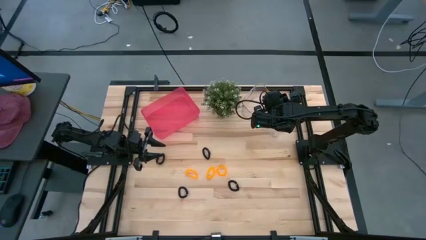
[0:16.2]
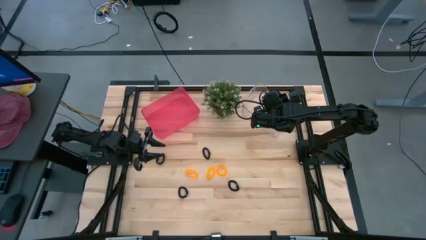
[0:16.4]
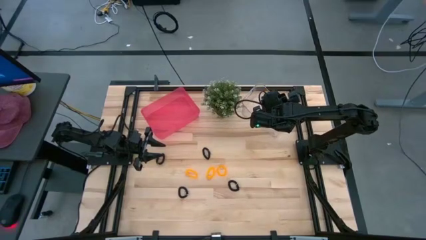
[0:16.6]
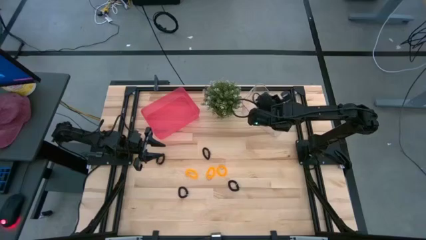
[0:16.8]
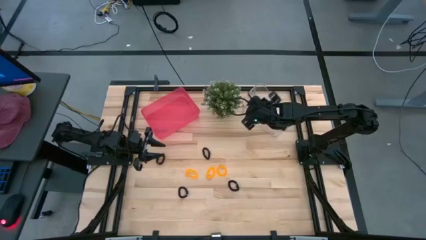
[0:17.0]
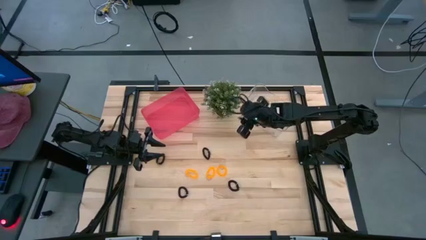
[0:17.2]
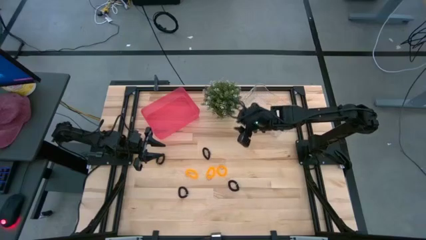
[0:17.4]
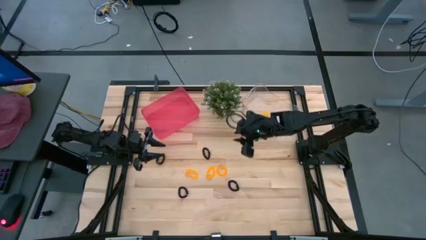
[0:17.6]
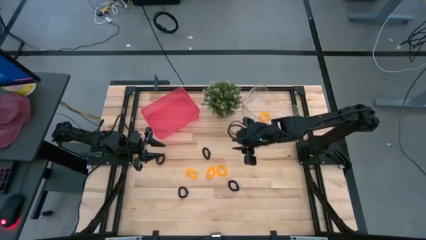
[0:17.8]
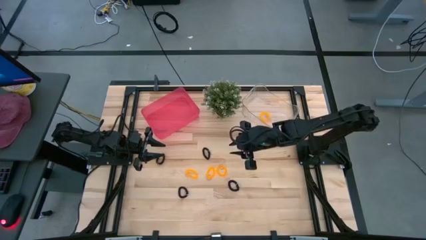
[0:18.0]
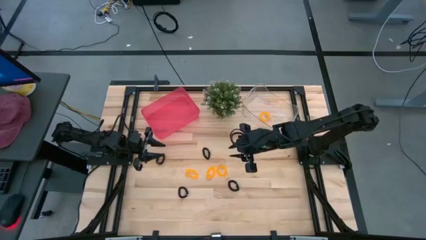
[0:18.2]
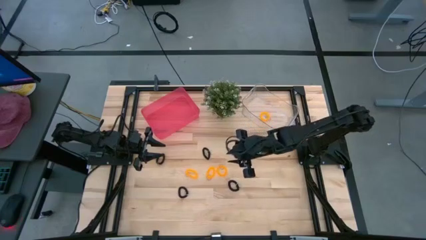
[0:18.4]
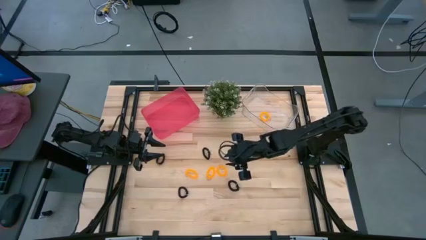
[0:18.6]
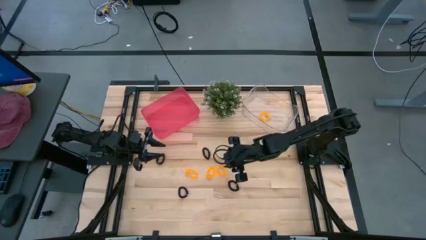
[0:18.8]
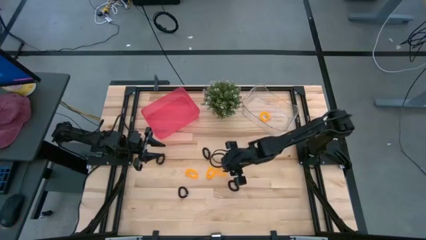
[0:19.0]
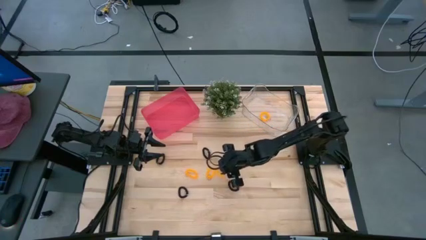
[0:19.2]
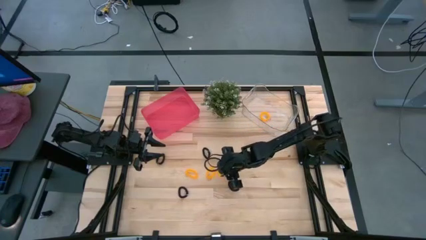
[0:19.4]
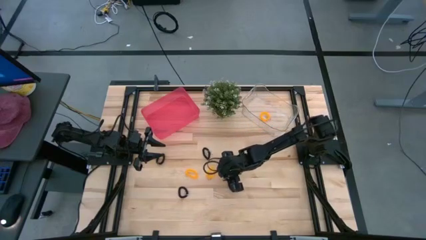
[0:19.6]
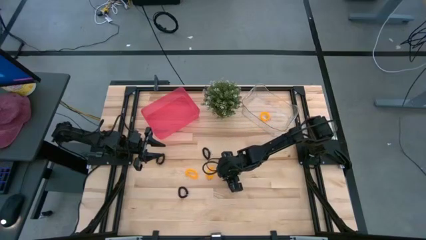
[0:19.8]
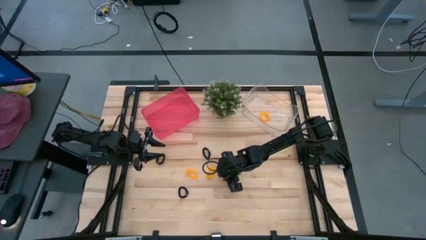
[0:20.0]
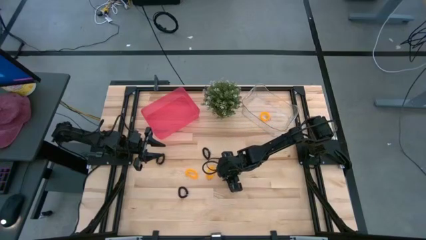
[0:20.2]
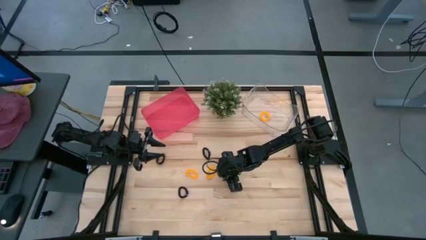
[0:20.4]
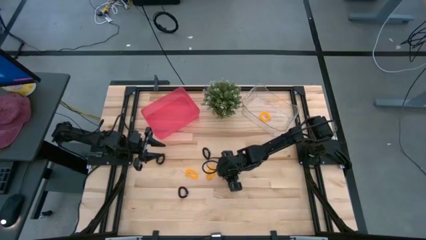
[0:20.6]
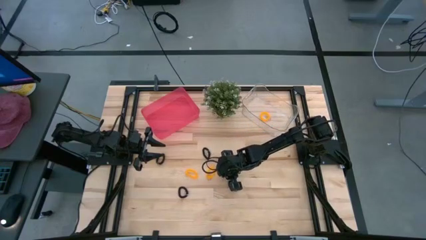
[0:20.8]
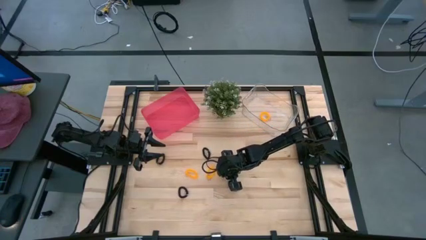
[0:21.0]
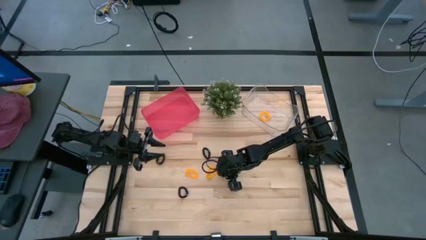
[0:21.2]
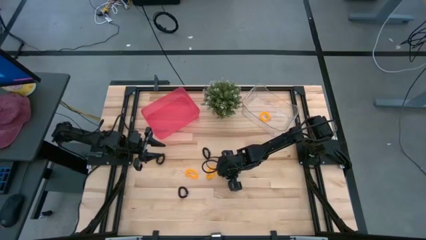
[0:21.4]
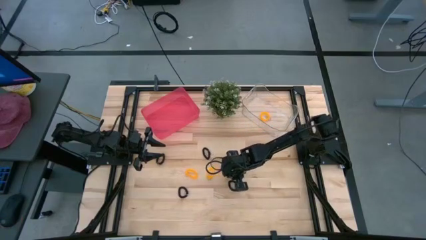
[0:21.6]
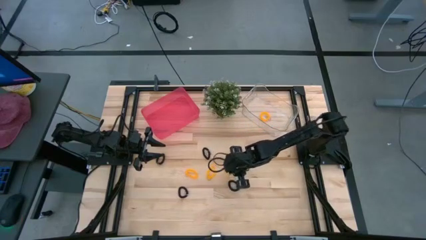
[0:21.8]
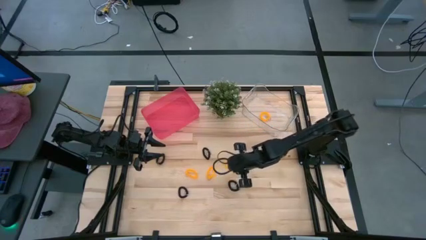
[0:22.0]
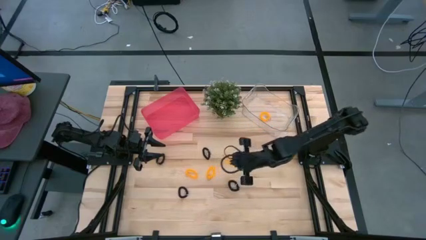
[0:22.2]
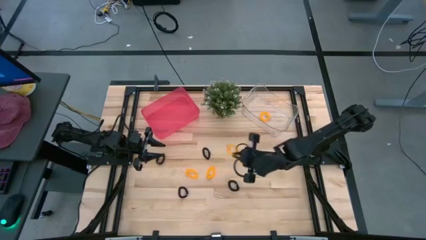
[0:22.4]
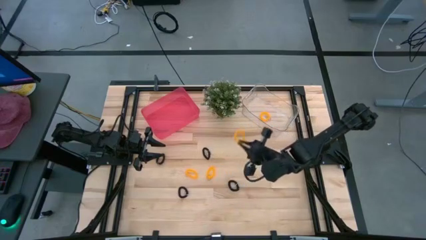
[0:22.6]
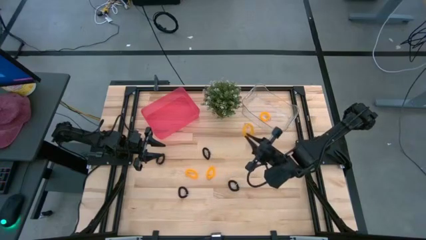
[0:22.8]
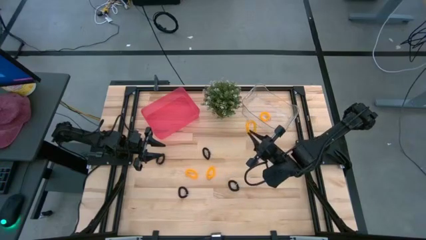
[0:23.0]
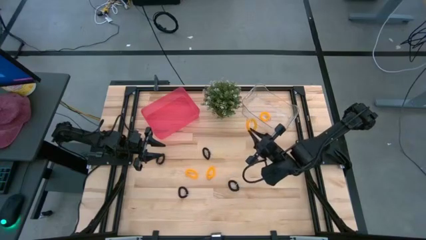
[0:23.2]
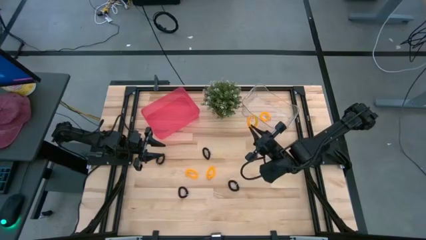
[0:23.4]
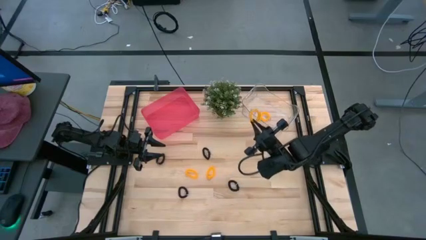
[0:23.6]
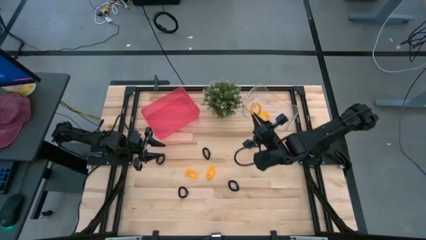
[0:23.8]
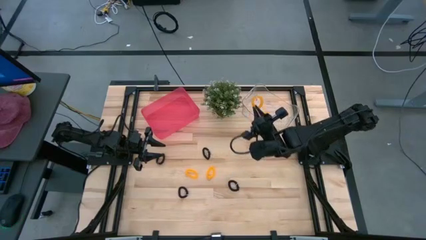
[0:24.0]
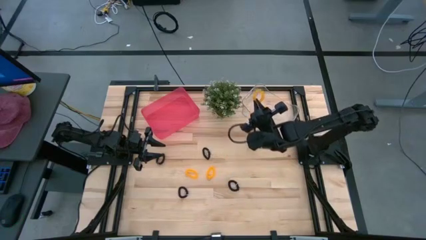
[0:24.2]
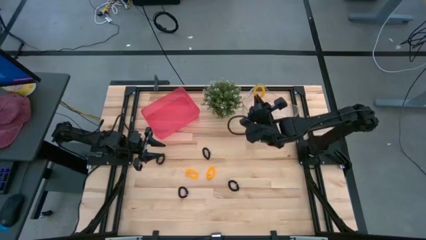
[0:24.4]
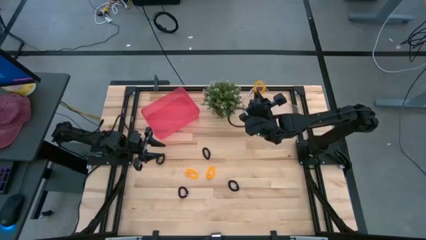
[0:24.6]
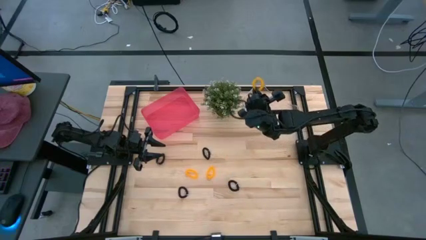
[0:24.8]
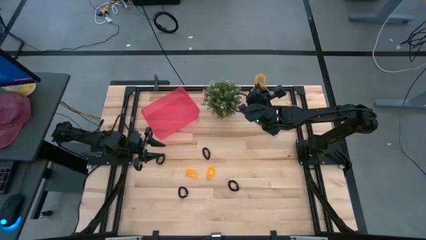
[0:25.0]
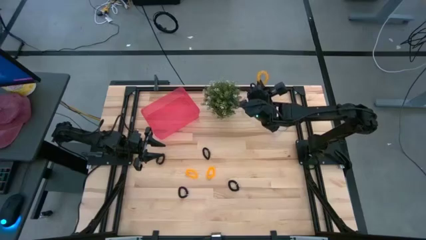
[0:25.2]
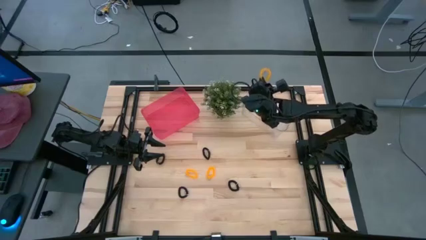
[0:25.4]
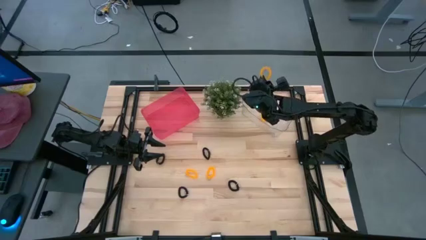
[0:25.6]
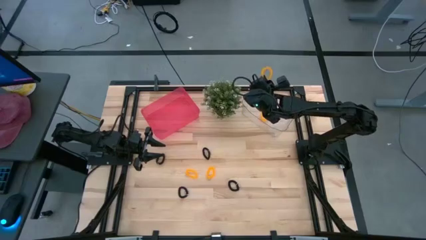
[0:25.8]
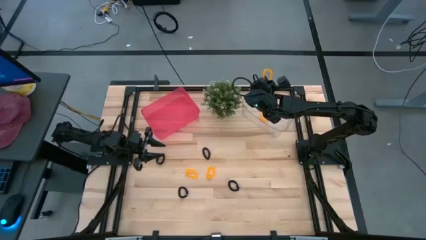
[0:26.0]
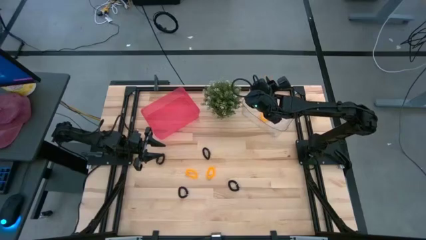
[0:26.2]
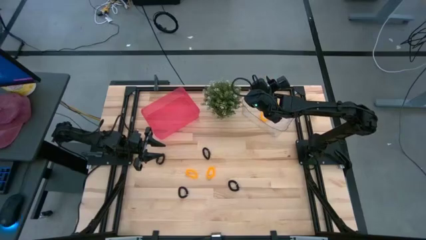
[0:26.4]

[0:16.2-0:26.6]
Task: Sort spring keychains
Put the yellow spring keychain into the transparent bin

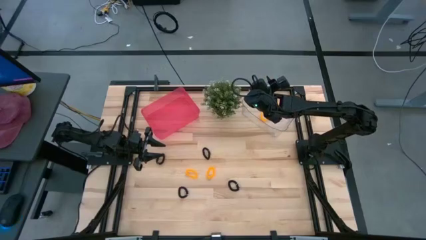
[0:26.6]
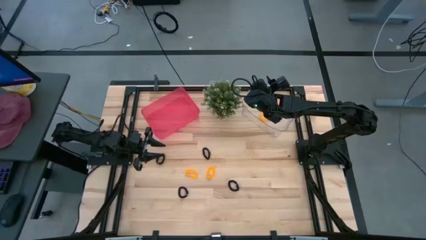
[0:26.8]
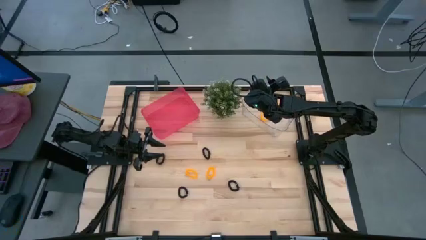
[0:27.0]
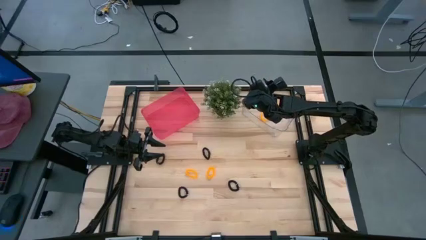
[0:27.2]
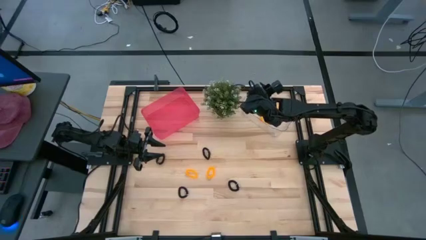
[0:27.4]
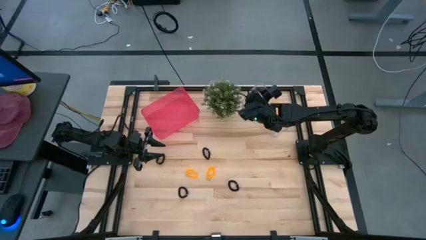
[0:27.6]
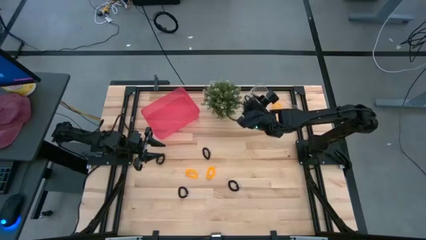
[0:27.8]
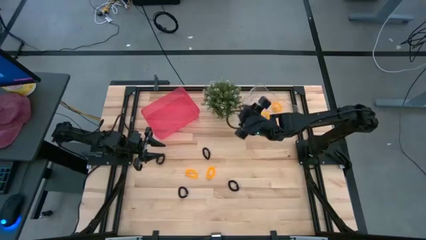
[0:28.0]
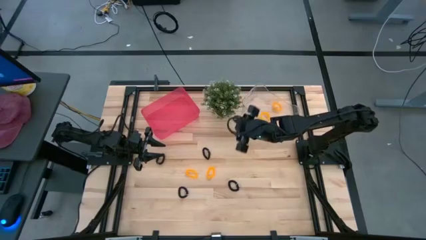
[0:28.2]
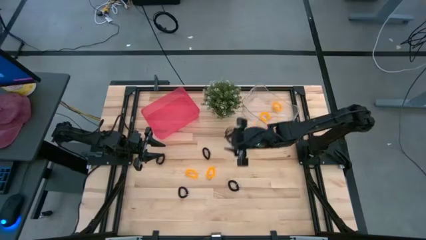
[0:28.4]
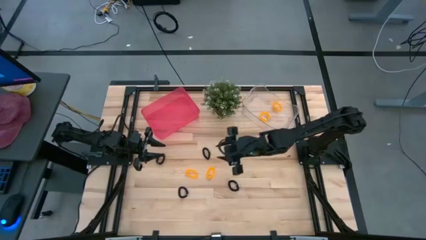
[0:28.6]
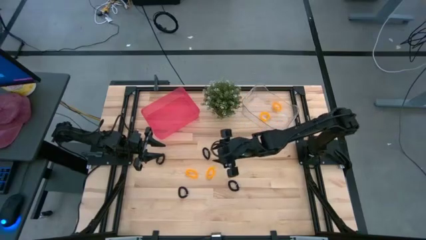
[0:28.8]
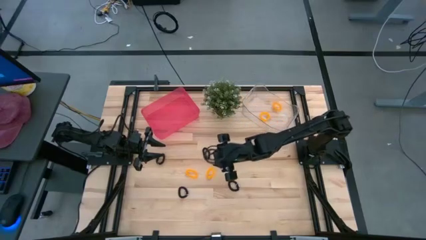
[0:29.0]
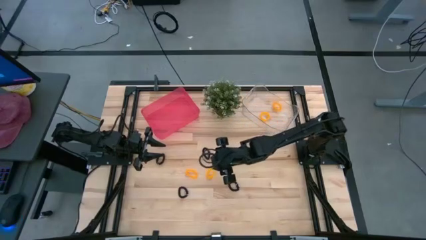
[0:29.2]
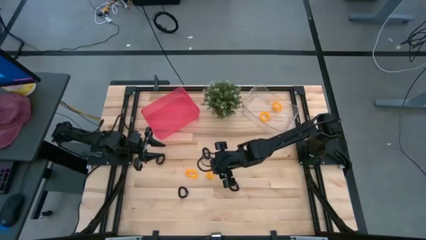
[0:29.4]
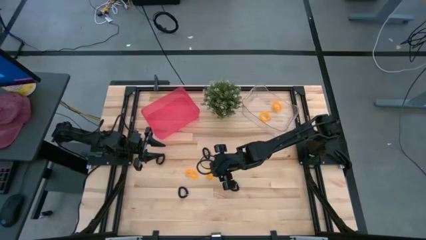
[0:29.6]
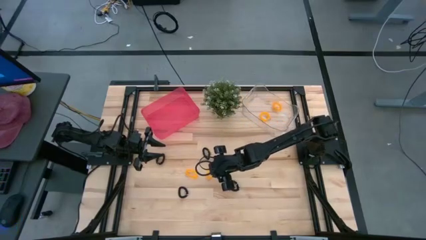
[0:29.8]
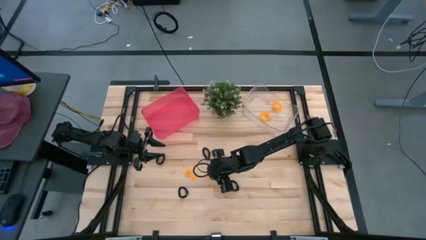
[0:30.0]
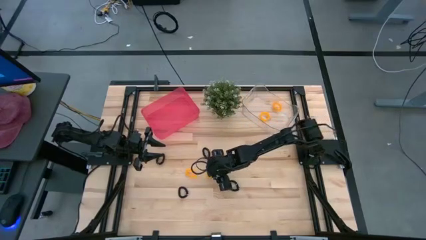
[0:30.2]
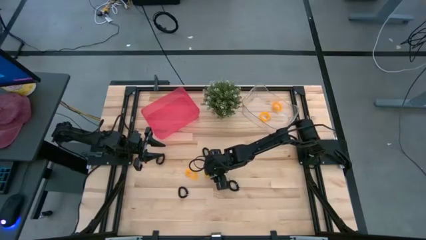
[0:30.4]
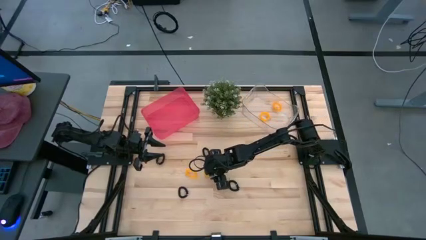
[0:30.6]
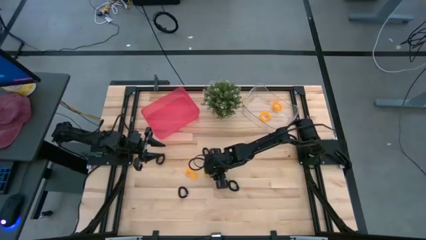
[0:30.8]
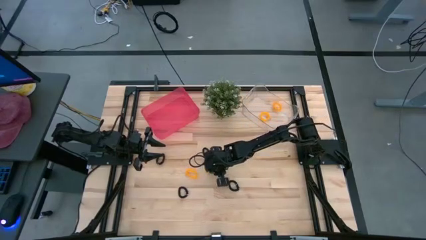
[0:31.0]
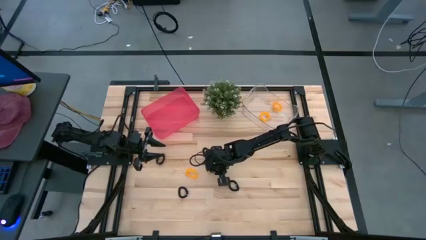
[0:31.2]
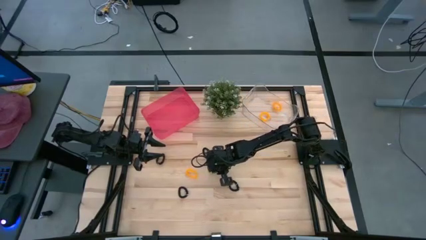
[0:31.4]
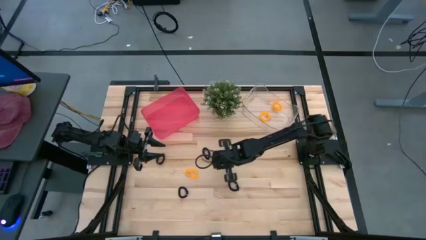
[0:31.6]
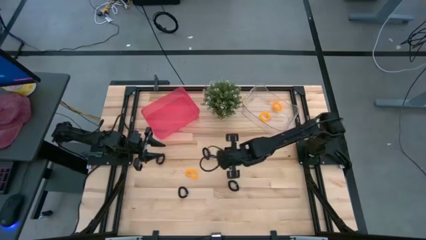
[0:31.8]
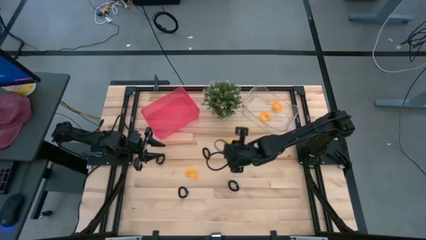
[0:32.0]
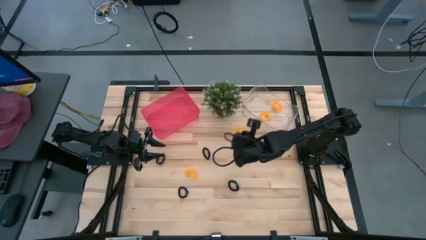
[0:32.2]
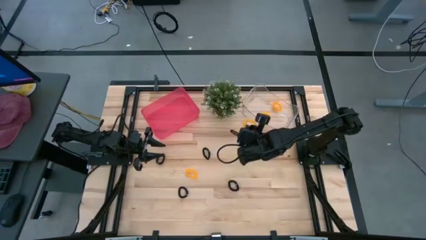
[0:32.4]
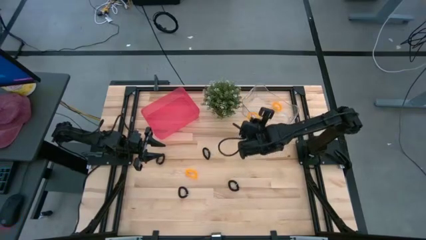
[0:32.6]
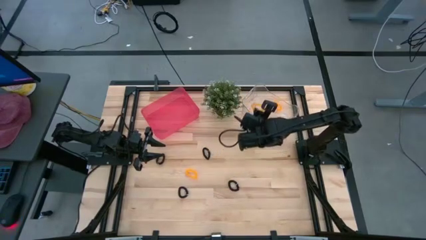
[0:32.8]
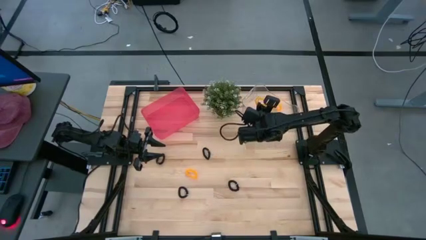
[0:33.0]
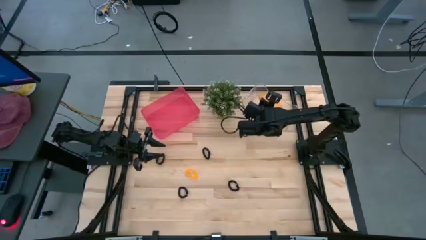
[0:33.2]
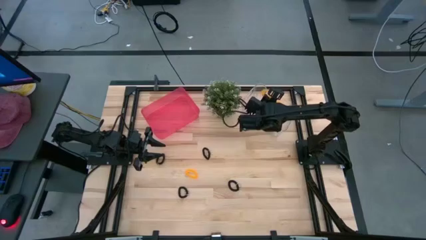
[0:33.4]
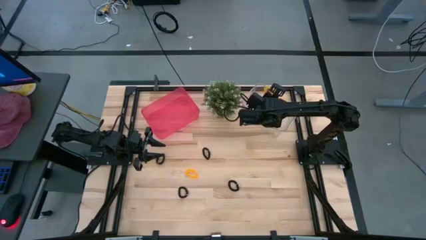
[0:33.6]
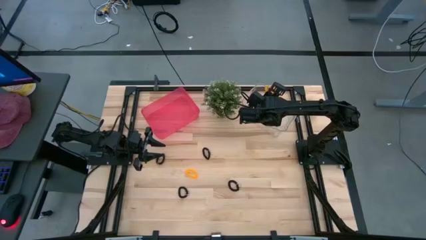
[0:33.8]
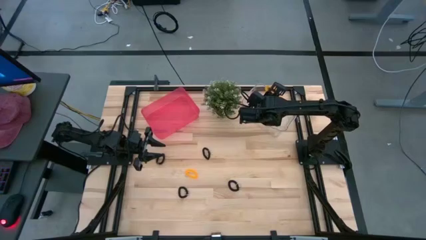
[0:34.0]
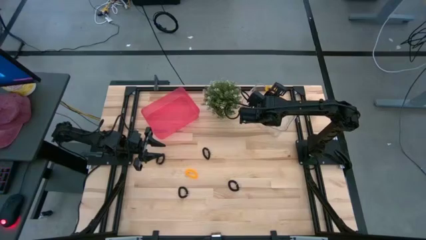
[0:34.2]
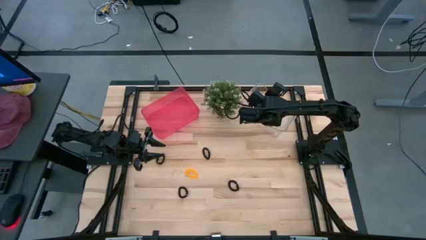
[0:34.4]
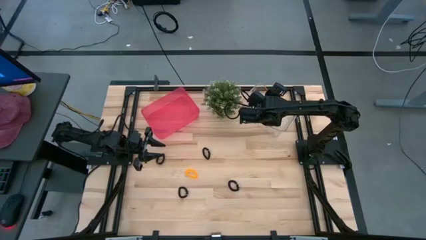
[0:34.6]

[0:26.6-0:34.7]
Put the yellow spring keychain into the transparent bin
